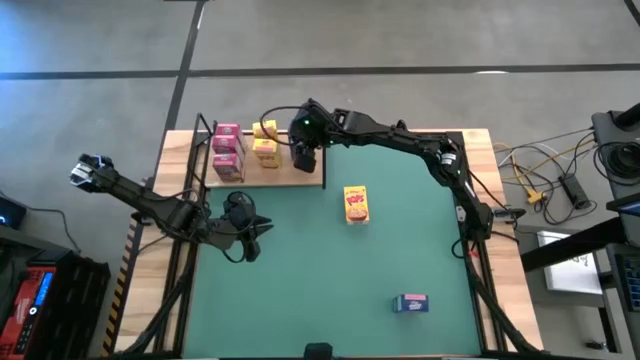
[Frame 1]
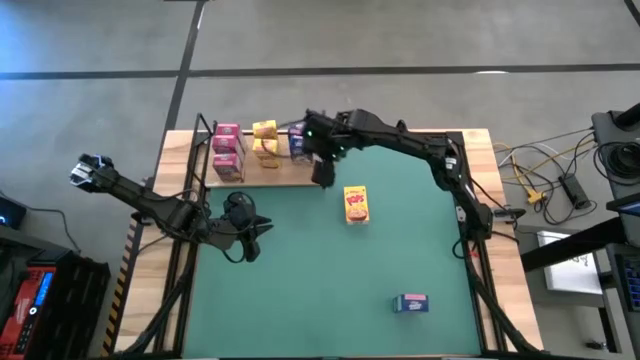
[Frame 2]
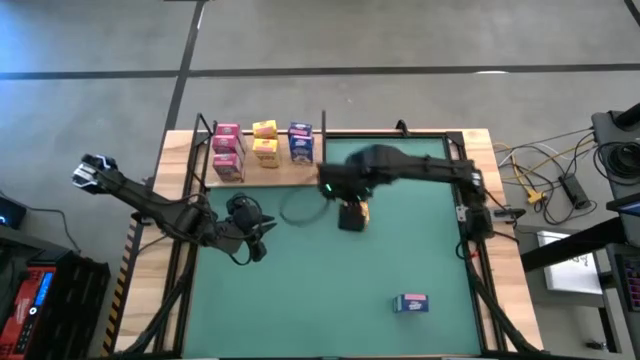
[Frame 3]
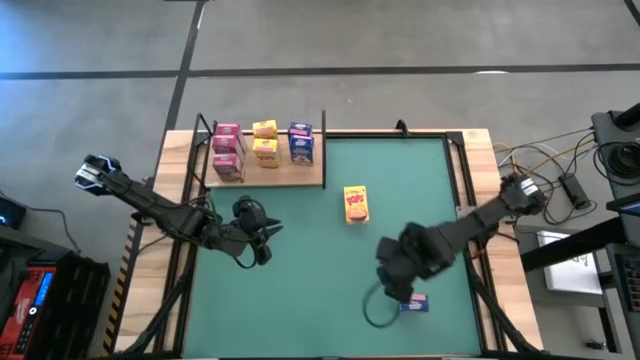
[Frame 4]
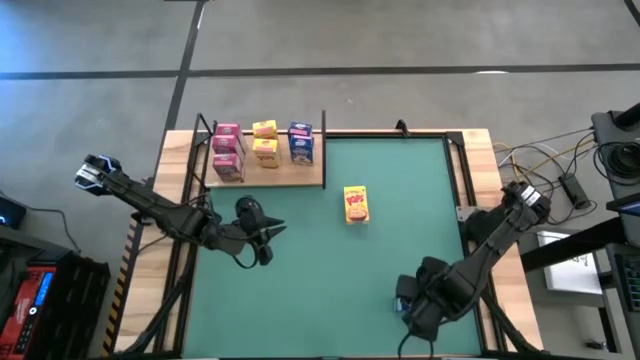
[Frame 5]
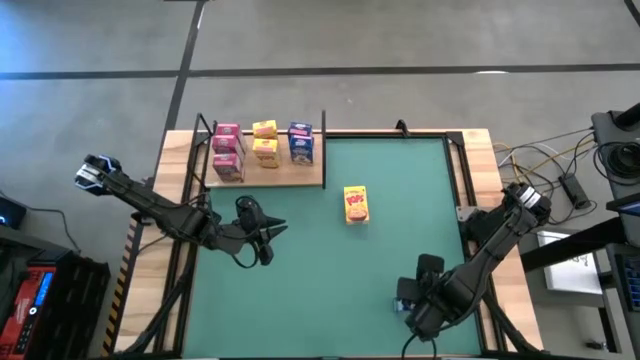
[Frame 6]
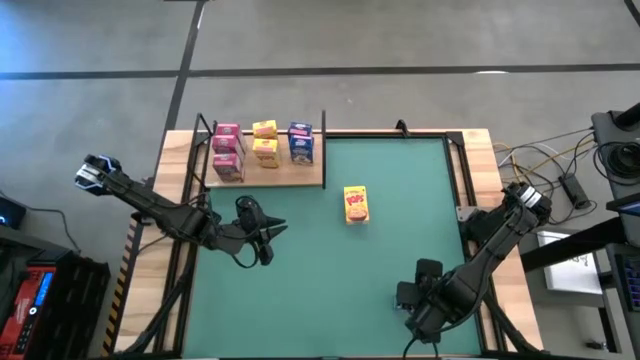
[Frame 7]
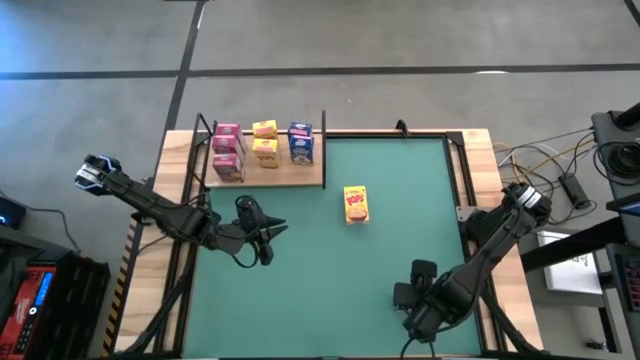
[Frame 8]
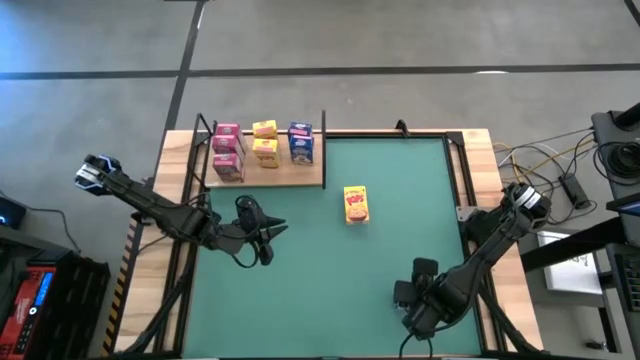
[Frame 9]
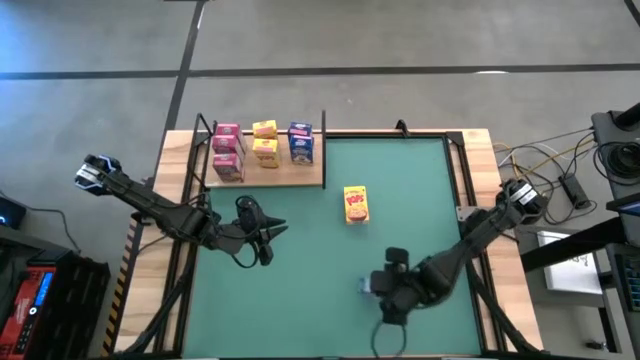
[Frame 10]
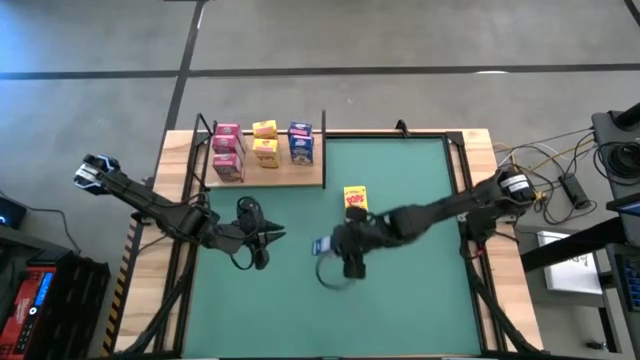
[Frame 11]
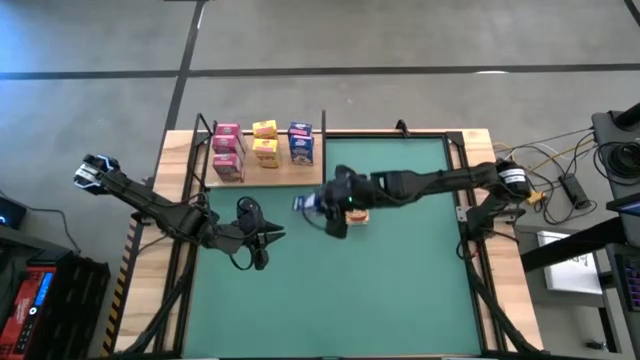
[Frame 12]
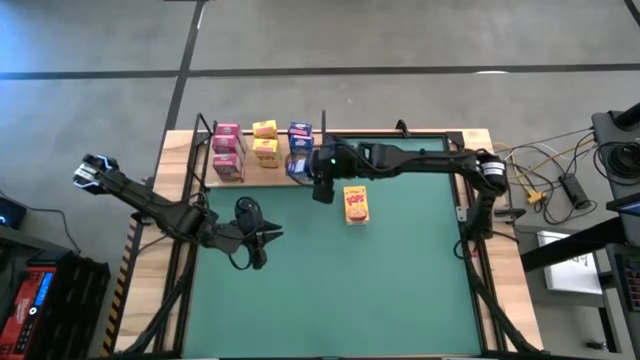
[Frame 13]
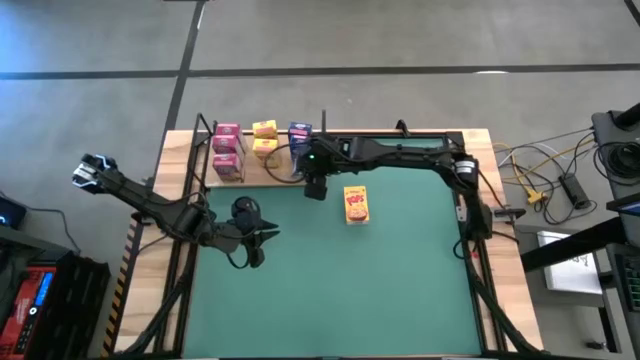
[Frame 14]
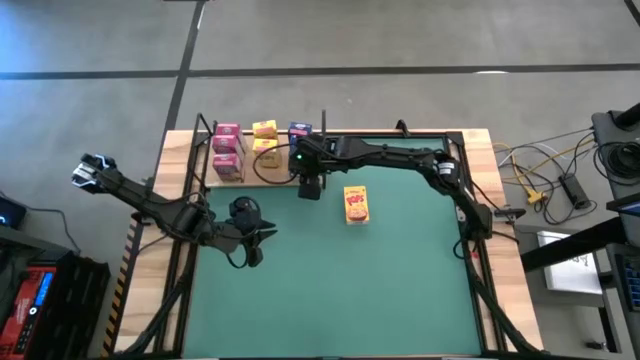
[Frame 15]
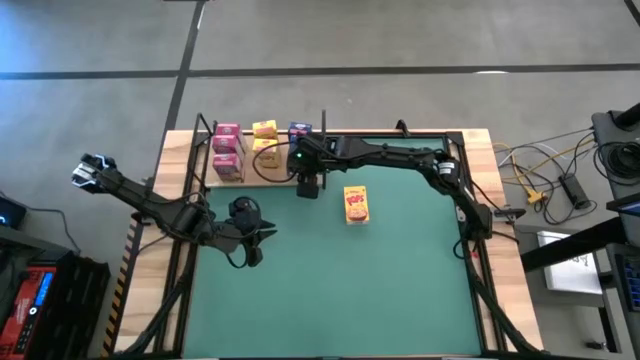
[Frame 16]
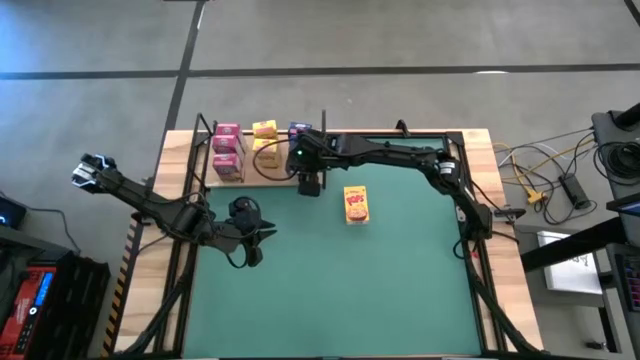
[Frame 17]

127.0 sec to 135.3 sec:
Task: Stack cereal on shelf
Put the blue cereal box on the shelf aligned with the blue cereal boxes

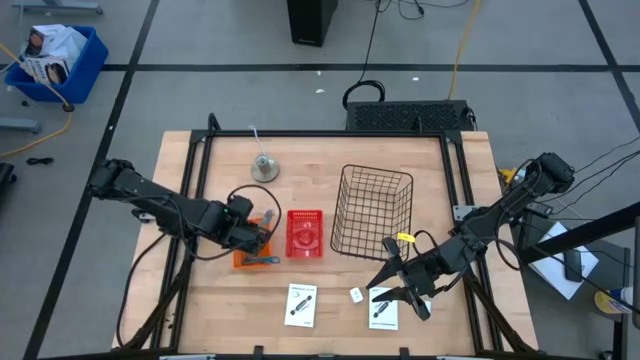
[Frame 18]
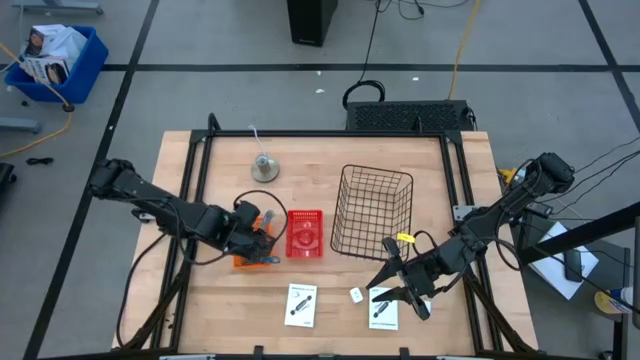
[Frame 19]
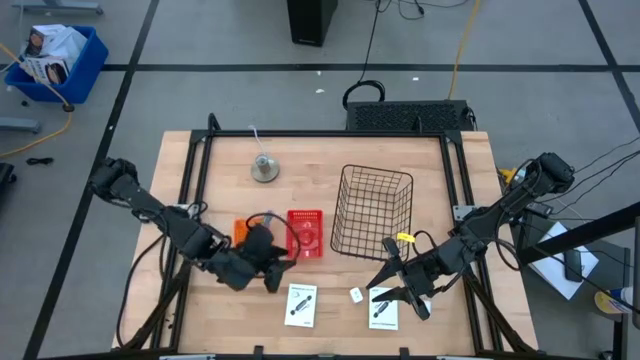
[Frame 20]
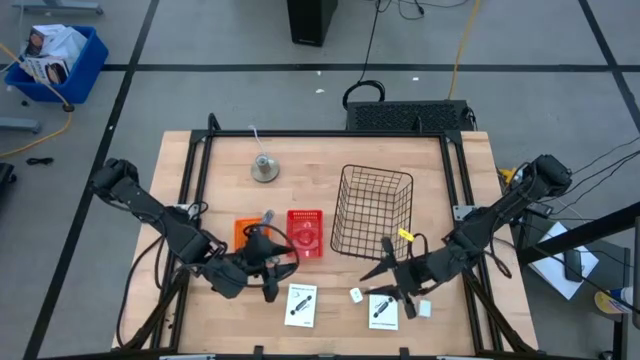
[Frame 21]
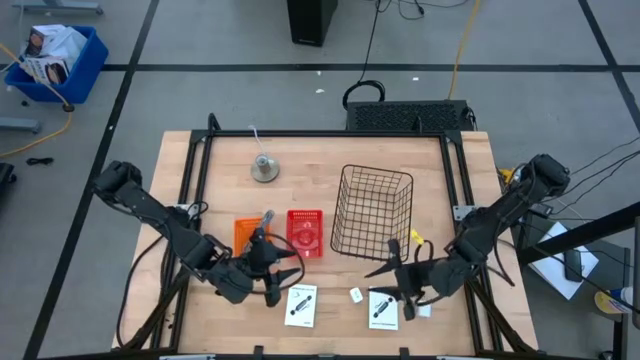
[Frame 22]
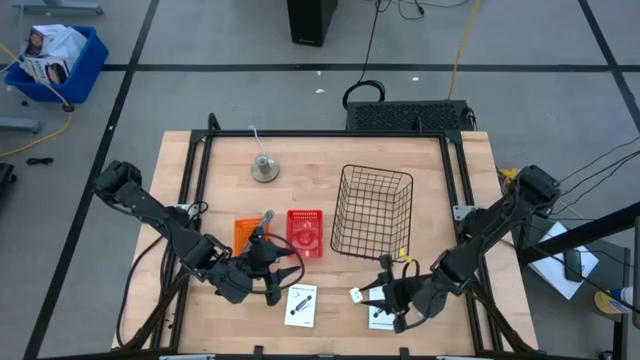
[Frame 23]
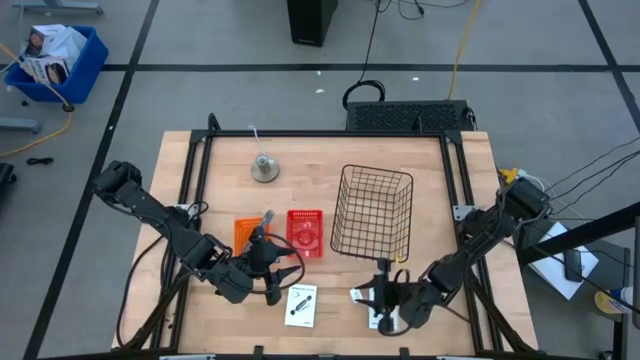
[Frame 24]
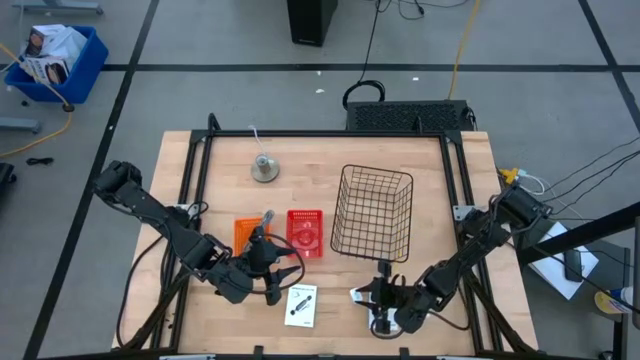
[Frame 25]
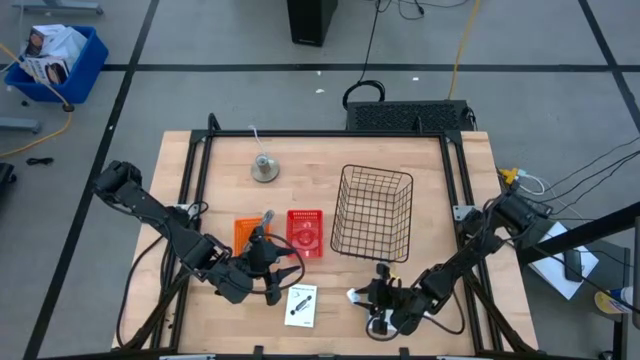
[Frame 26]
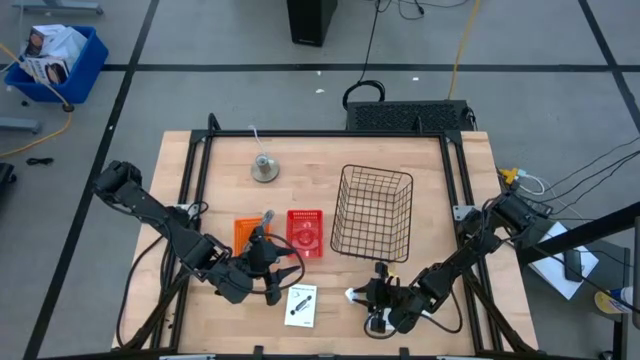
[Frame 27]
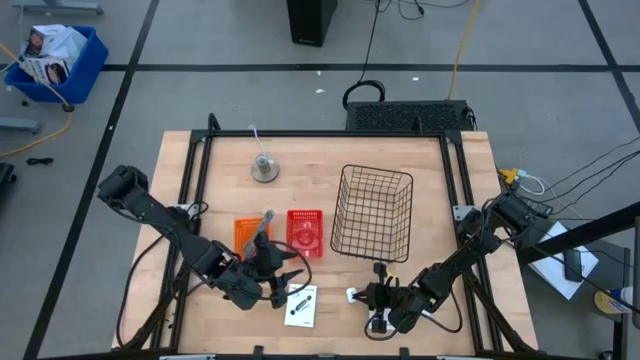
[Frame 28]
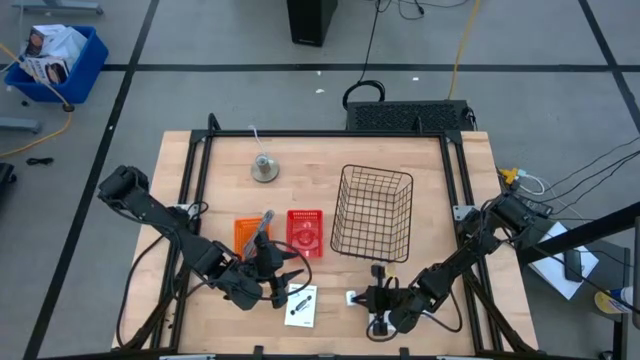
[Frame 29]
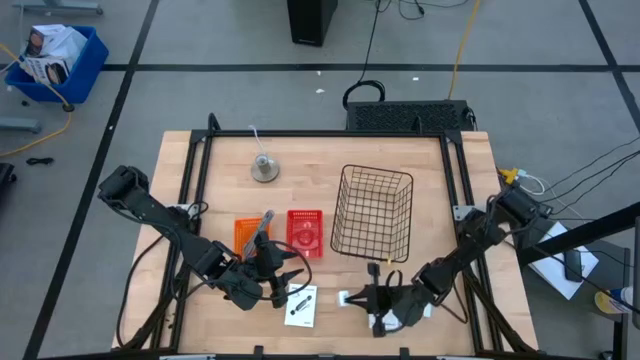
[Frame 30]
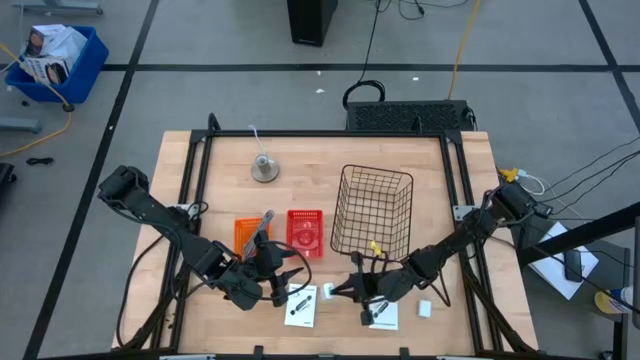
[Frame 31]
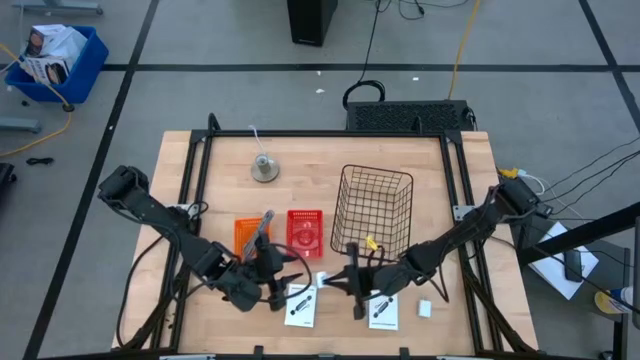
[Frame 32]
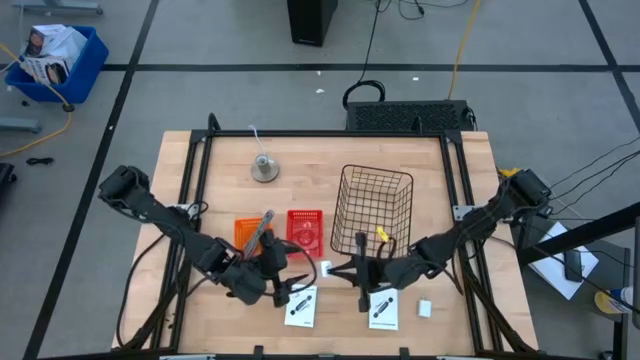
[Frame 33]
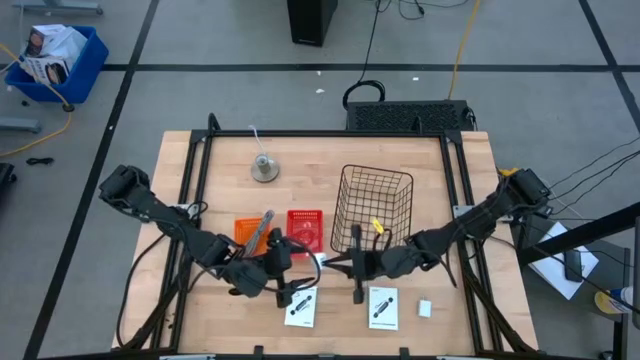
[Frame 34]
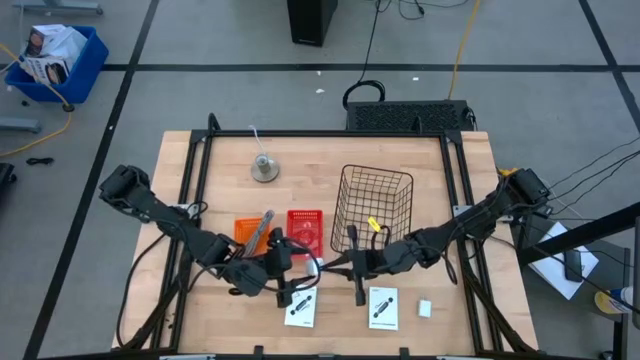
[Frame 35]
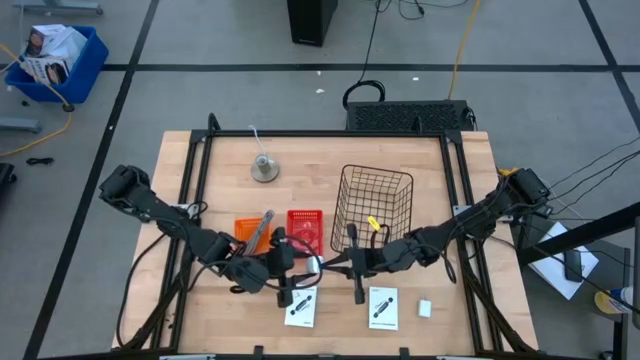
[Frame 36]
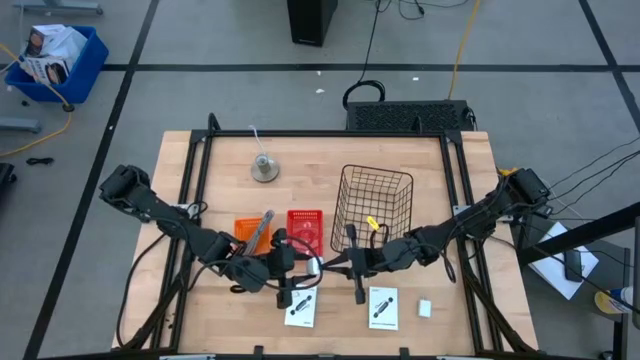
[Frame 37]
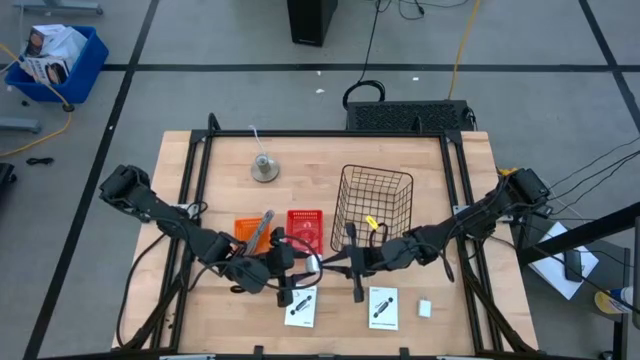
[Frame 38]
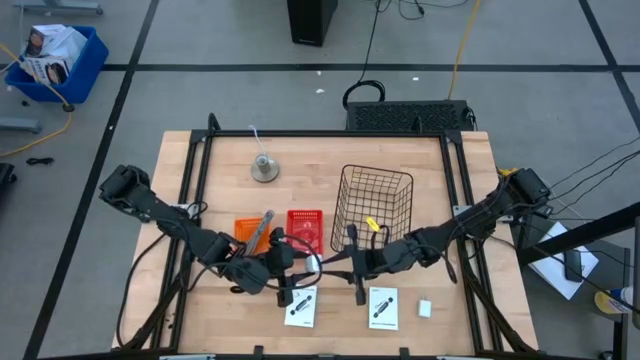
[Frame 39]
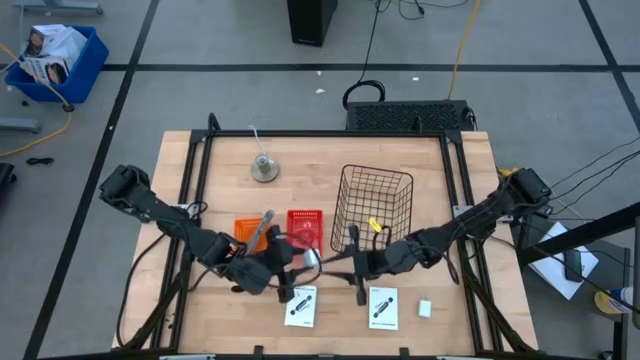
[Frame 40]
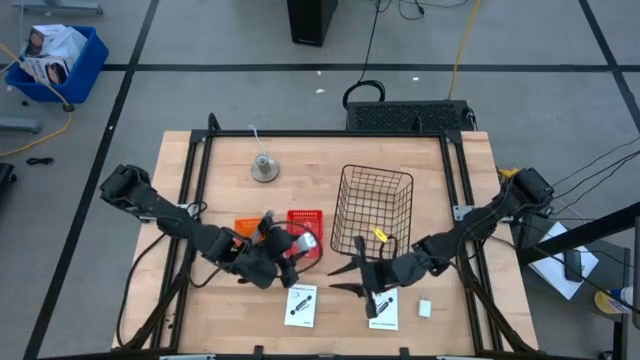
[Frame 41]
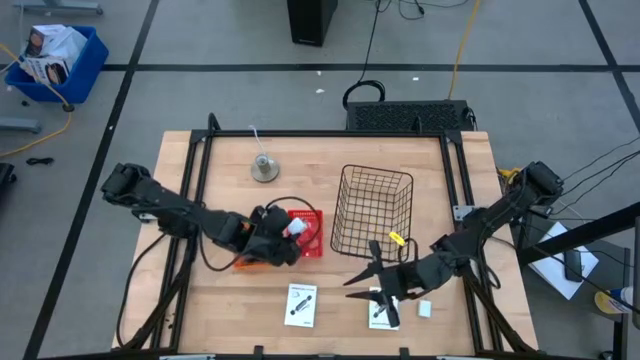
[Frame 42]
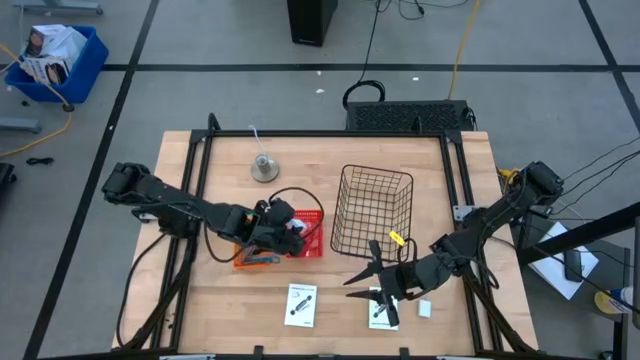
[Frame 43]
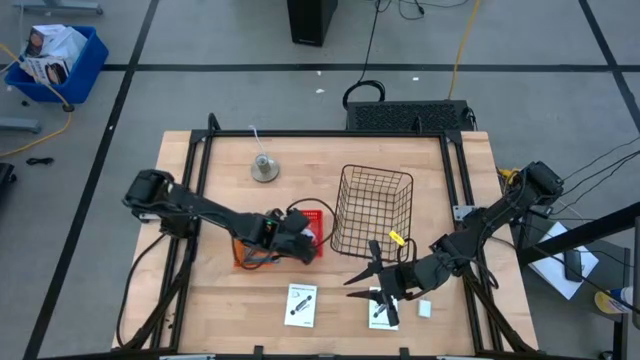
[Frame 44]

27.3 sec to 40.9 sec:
Task: Pick and place items into bin
Put the left charger adapter into the red bin
